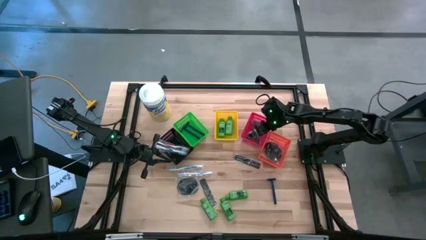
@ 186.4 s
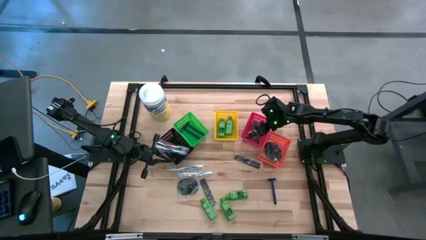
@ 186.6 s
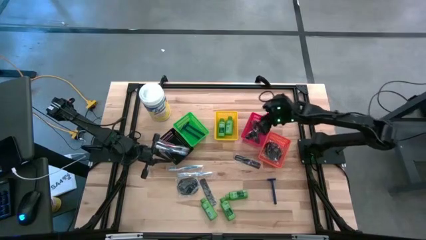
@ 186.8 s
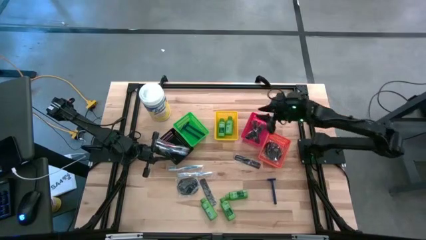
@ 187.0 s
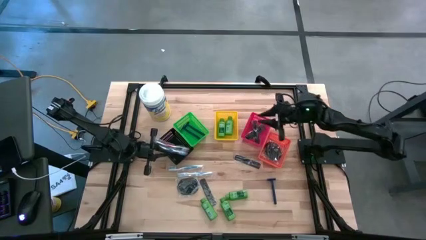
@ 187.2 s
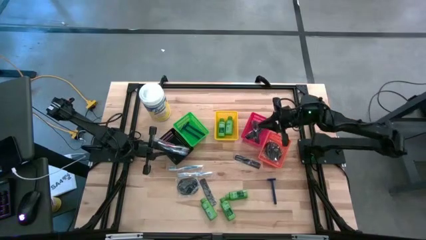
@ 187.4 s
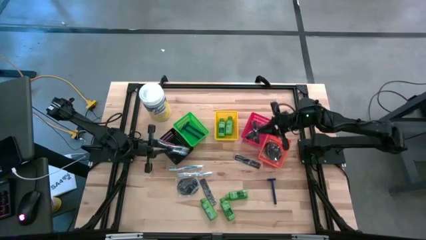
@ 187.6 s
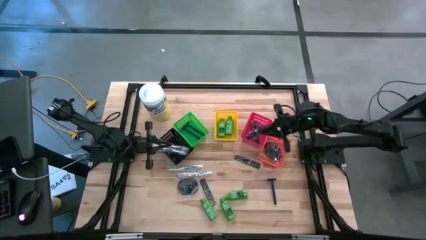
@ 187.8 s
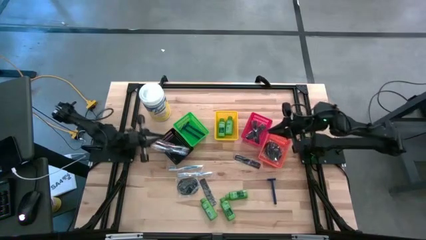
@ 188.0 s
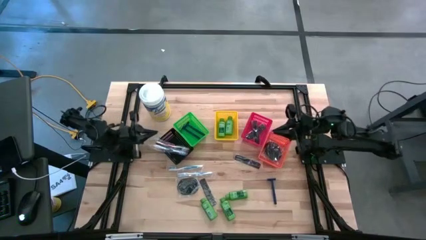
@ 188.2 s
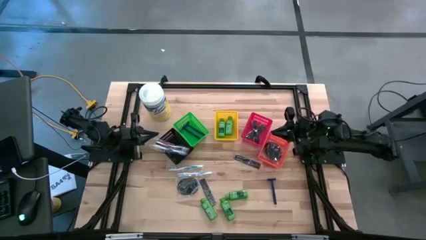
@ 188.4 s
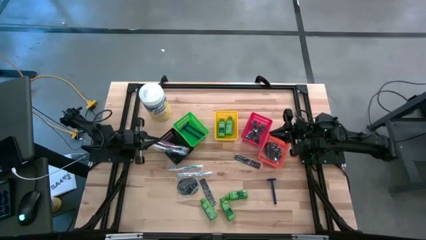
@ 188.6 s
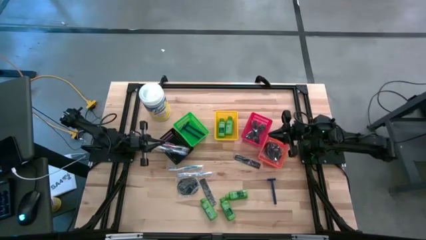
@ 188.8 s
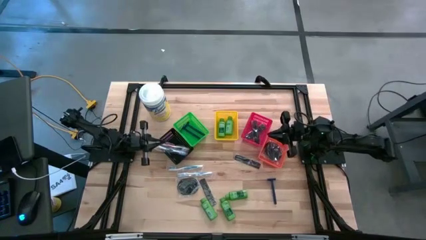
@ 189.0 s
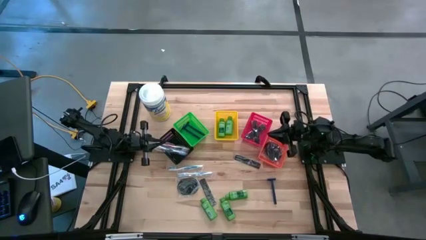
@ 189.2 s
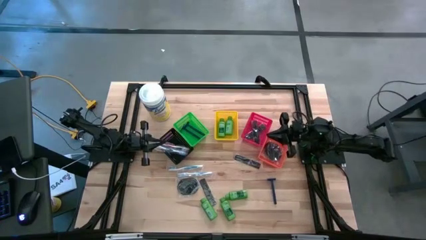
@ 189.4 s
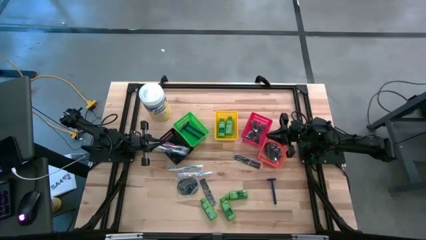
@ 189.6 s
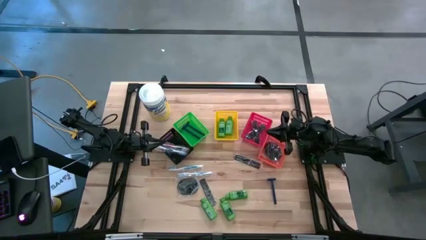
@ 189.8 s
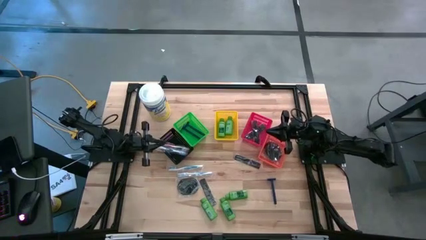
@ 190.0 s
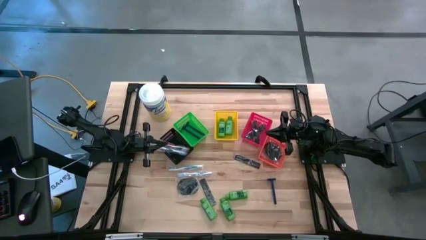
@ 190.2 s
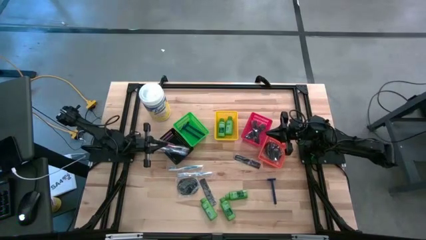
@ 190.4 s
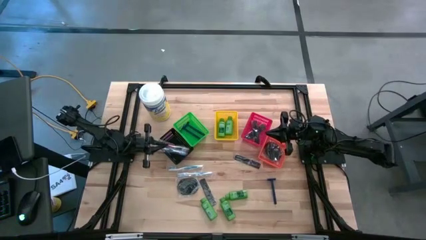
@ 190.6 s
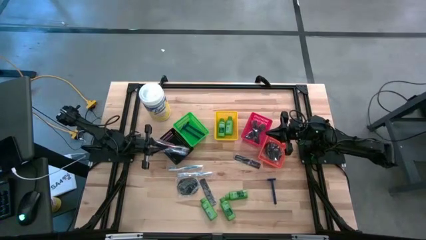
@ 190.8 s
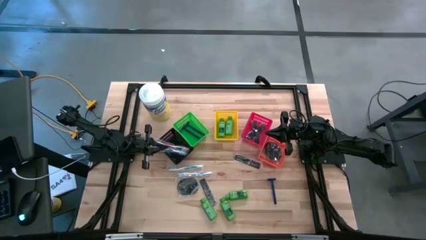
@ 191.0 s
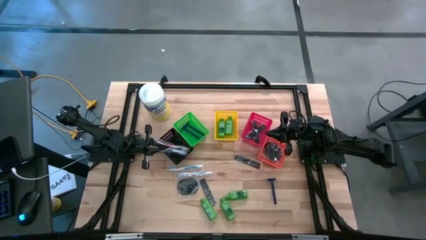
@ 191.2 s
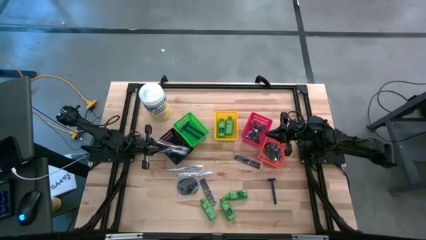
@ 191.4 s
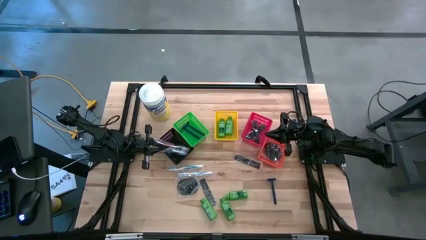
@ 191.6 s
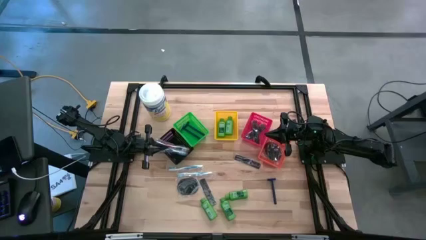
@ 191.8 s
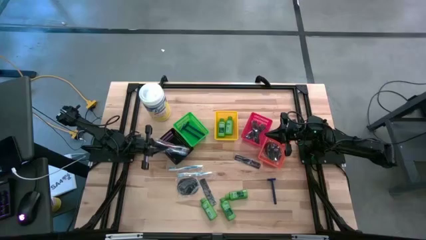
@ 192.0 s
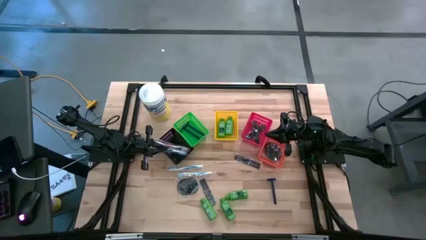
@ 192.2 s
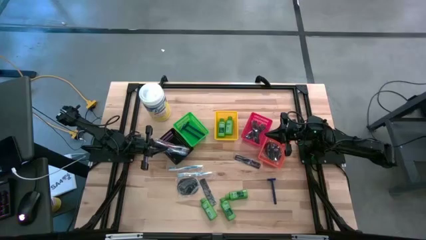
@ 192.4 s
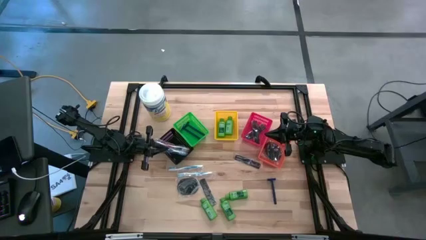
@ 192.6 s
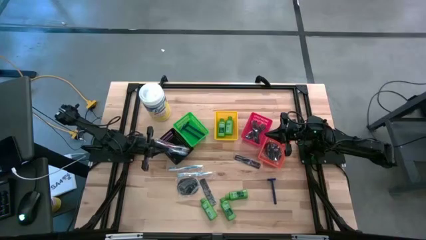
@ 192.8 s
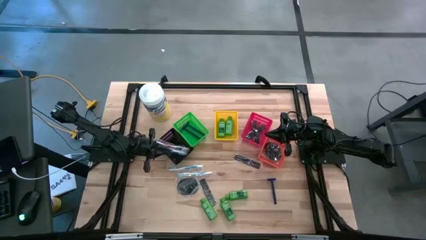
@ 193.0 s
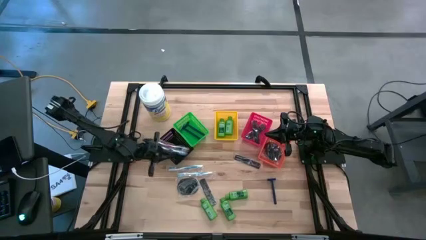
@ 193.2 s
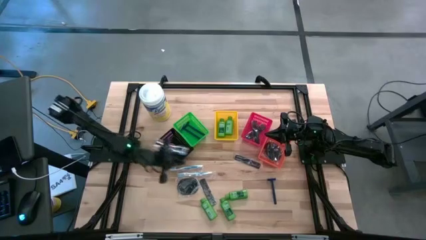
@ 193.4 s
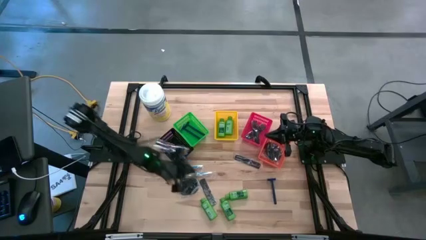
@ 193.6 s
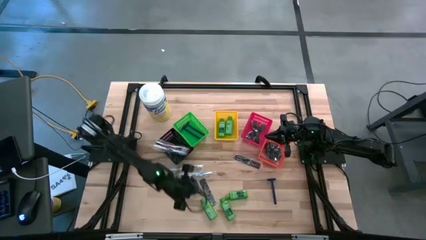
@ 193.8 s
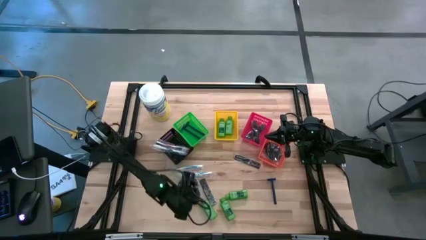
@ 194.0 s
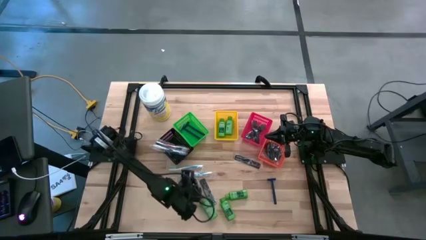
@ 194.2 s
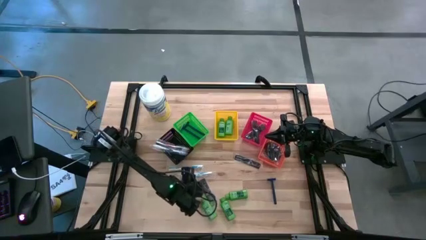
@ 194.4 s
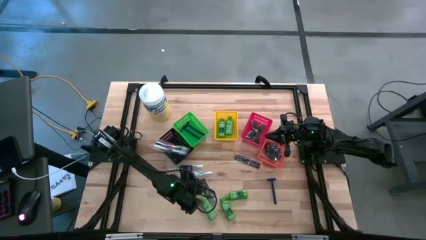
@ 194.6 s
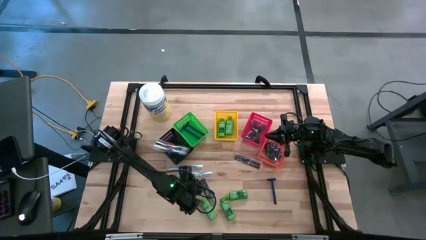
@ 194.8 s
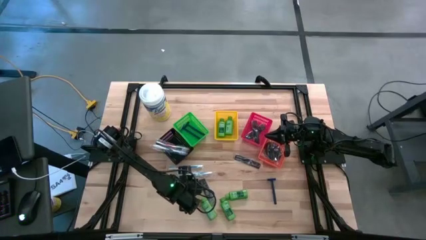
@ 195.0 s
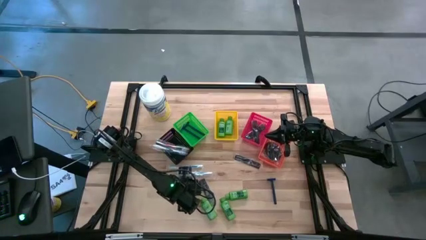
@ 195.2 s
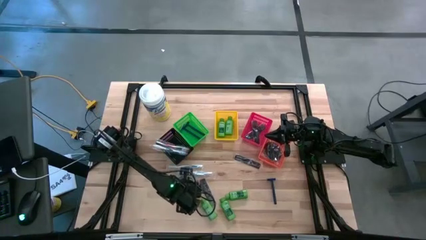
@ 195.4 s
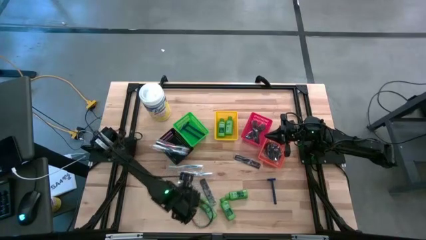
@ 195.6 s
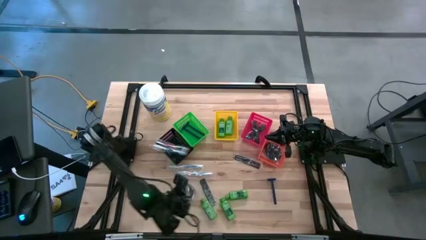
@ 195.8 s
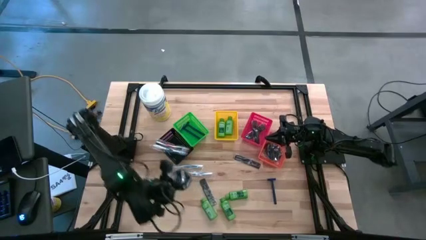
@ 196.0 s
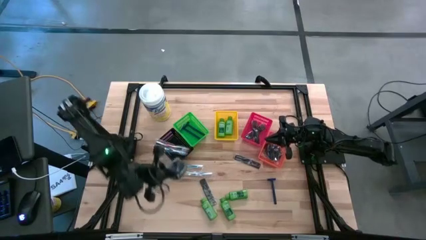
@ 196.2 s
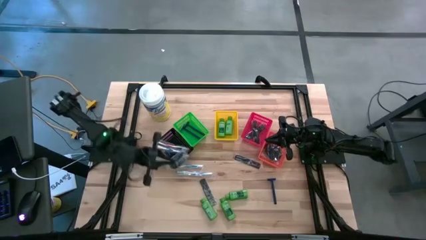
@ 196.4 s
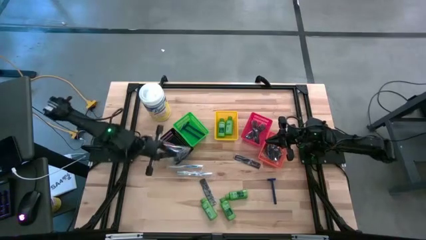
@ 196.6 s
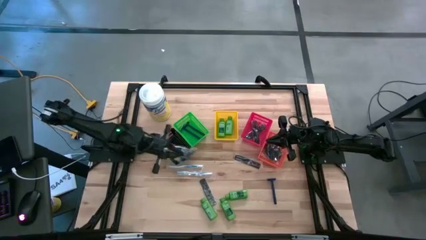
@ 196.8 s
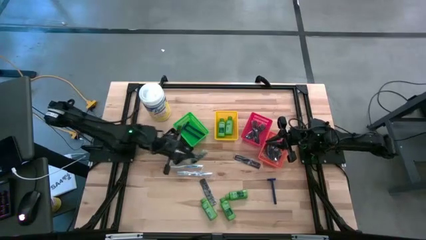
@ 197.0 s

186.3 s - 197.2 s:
Task: Pick & Place Travel size toiletries
Put the black hair brush into the red bin

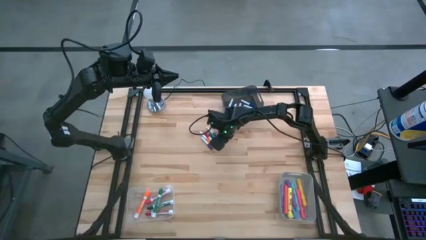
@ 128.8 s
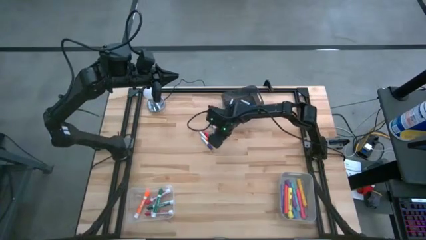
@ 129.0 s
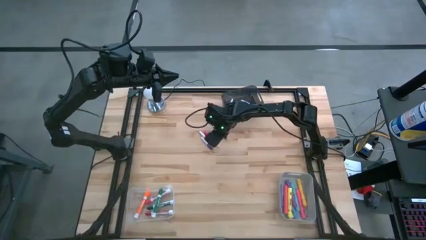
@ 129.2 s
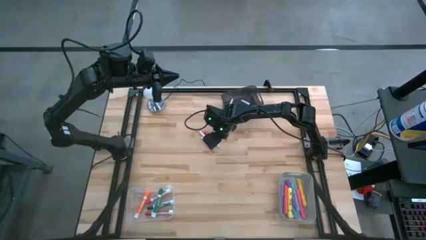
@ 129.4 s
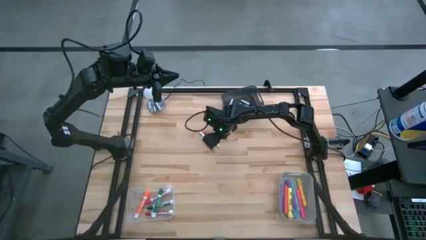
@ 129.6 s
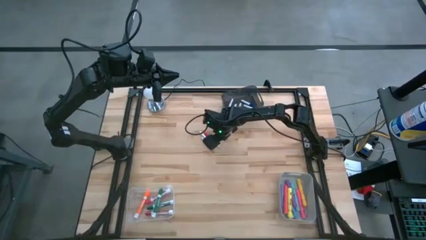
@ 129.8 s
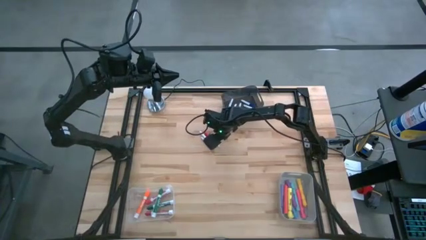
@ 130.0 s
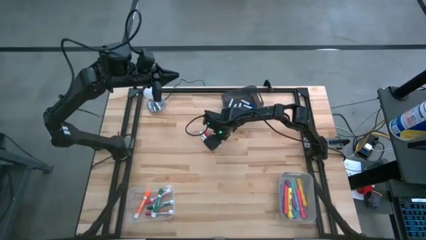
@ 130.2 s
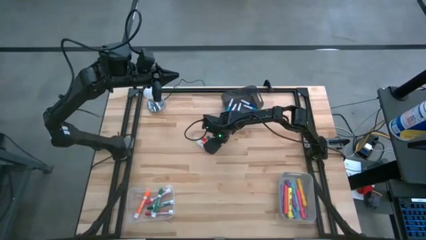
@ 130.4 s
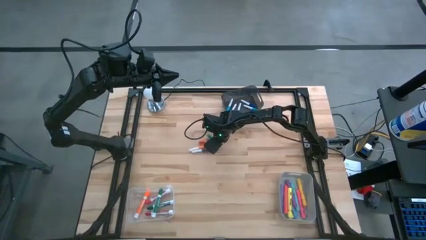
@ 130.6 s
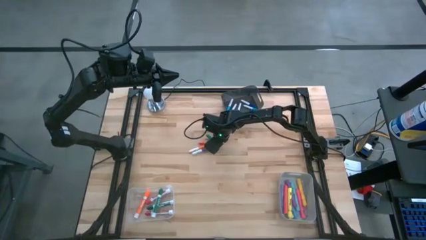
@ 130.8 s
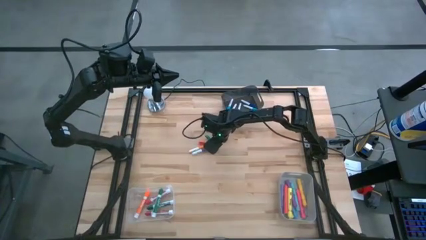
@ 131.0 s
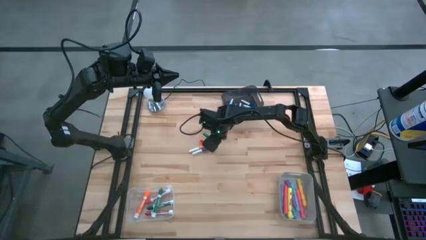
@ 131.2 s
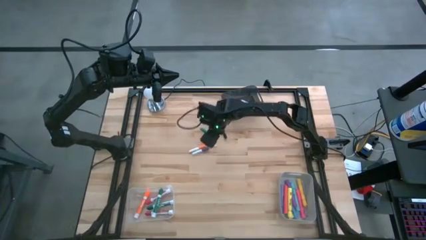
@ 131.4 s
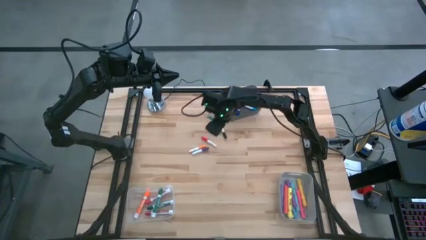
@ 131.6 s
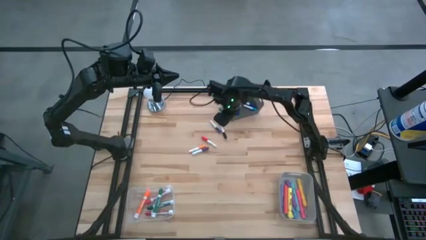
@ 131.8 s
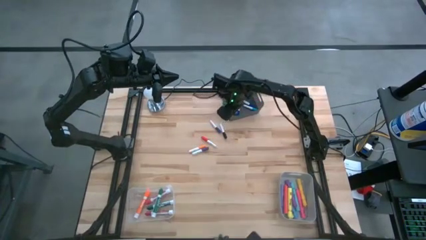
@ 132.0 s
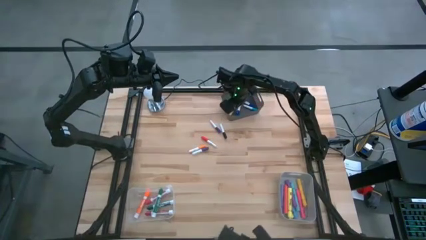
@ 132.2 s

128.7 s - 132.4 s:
Task: Pick & Place Markers
Put the small gray highlighter pen into the black bin

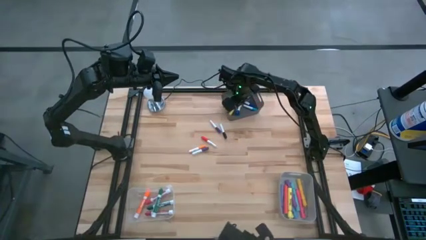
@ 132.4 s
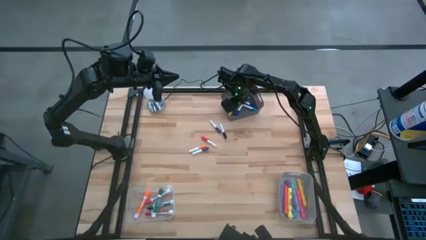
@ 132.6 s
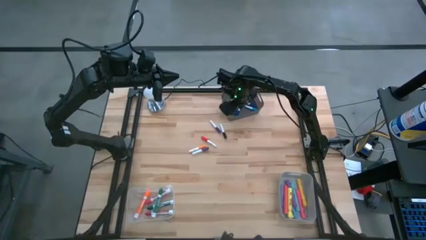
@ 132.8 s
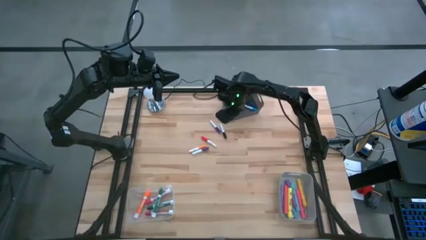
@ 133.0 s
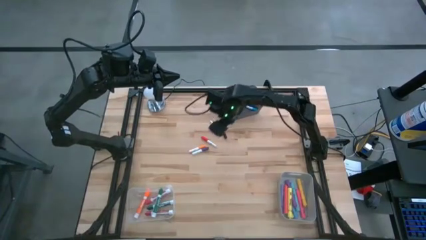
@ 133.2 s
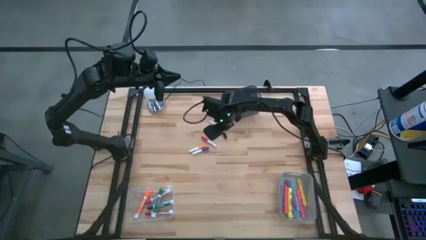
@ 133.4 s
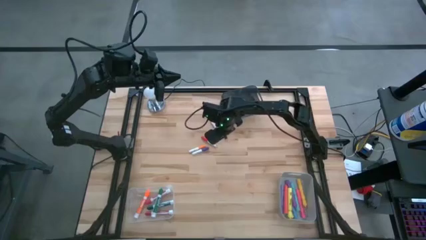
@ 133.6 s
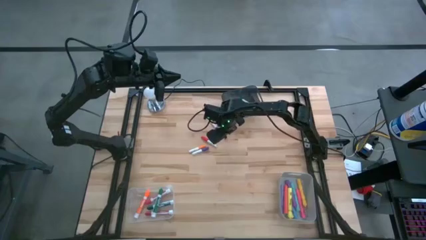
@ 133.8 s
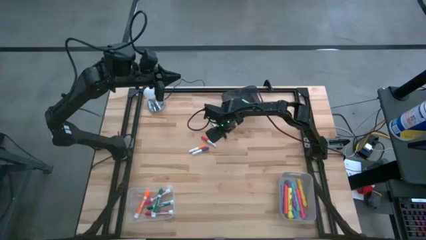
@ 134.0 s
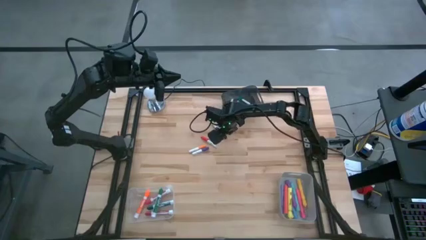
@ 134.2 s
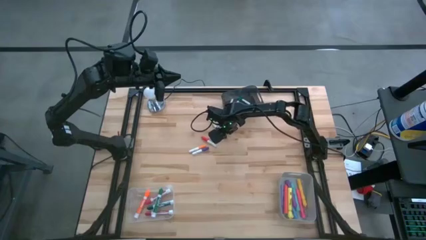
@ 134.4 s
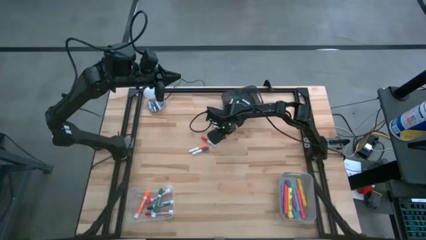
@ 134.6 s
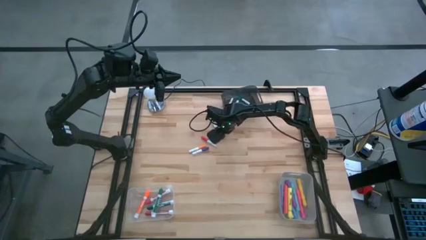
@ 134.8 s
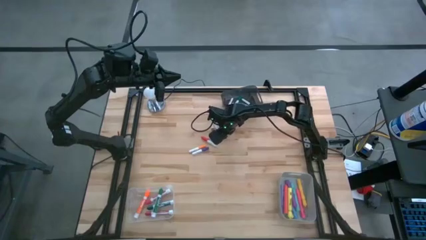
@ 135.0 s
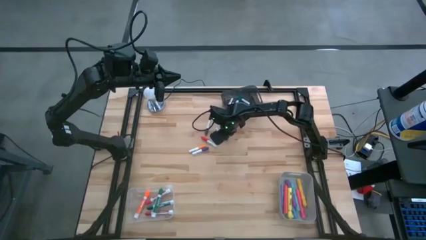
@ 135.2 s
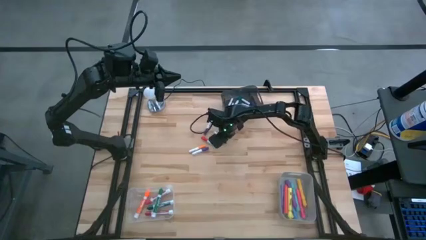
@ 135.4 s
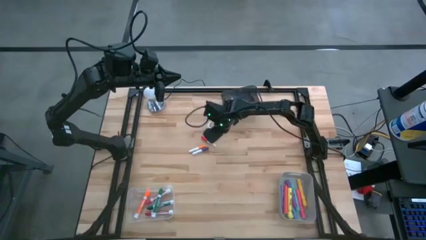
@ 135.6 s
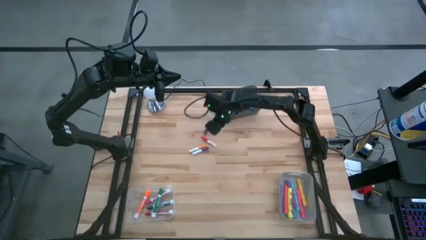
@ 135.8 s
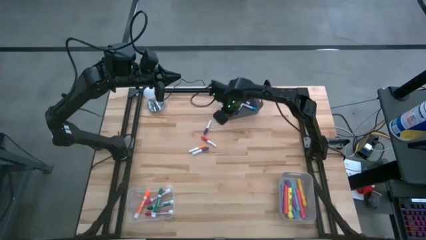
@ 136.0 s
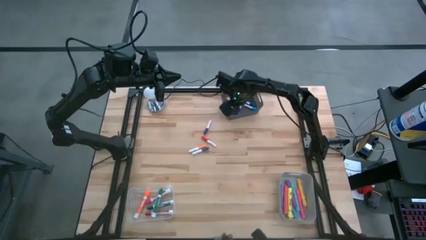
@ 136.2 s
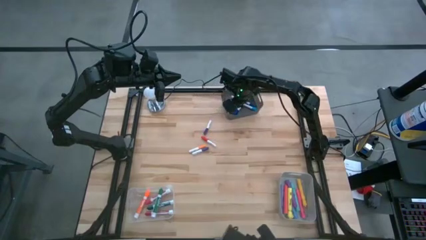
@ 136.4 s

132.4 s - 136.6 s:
Put the small black highlighter pen into the black bin
